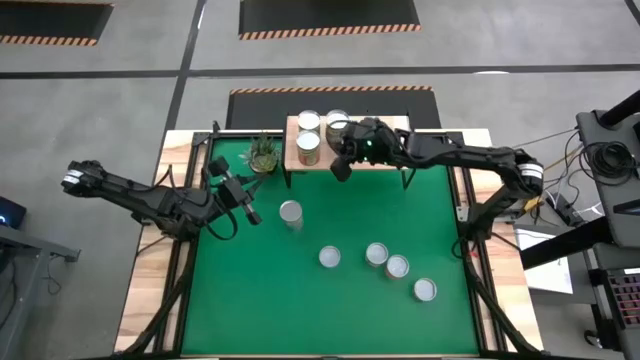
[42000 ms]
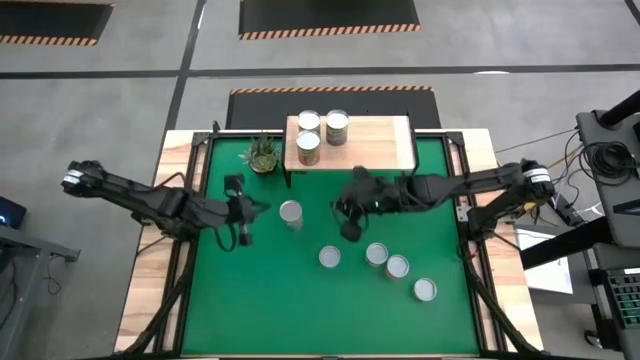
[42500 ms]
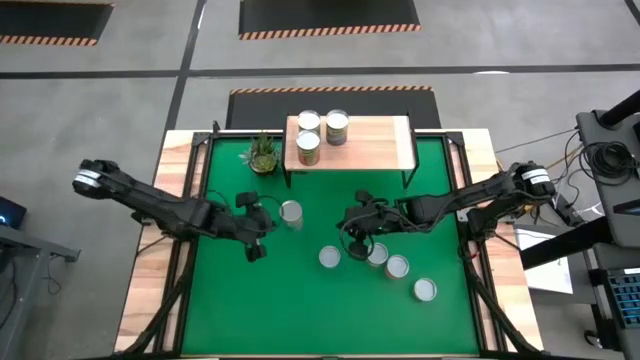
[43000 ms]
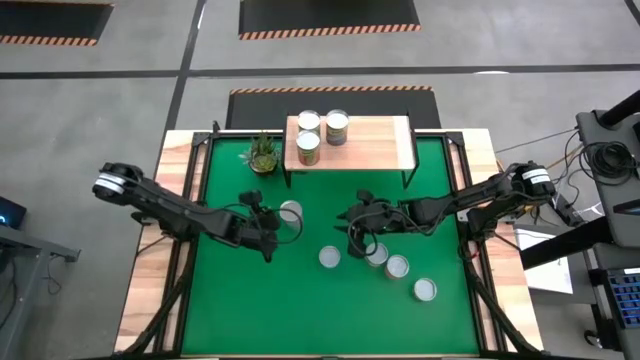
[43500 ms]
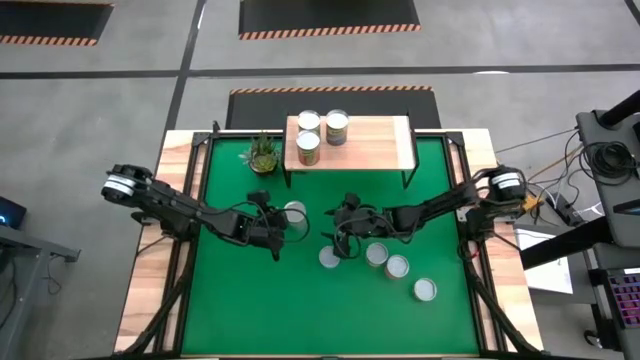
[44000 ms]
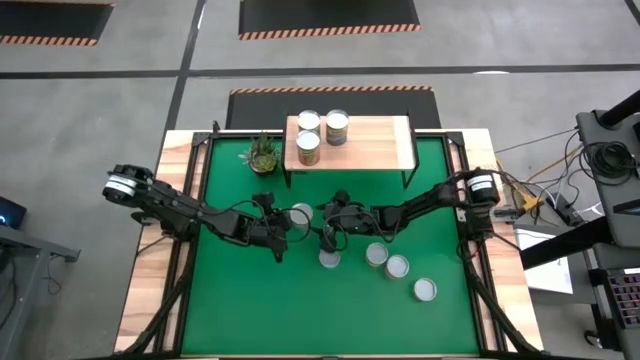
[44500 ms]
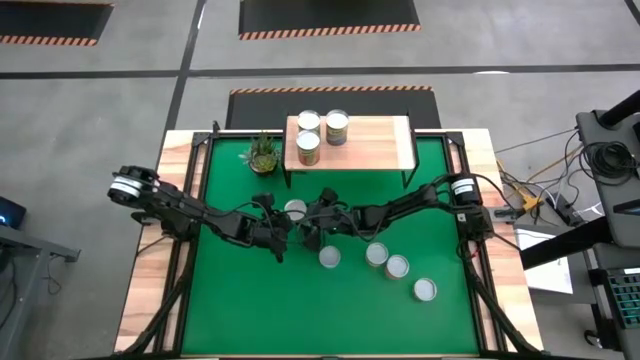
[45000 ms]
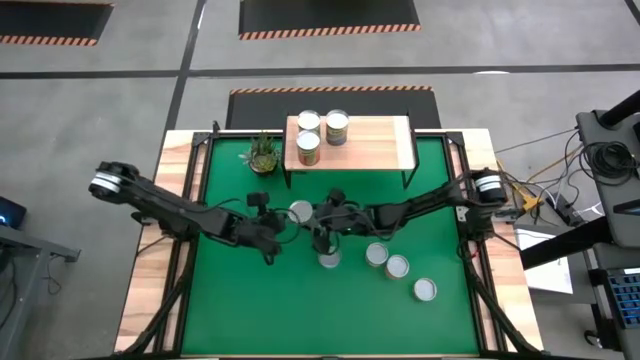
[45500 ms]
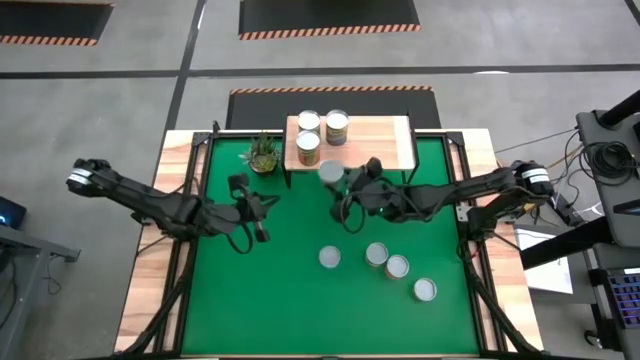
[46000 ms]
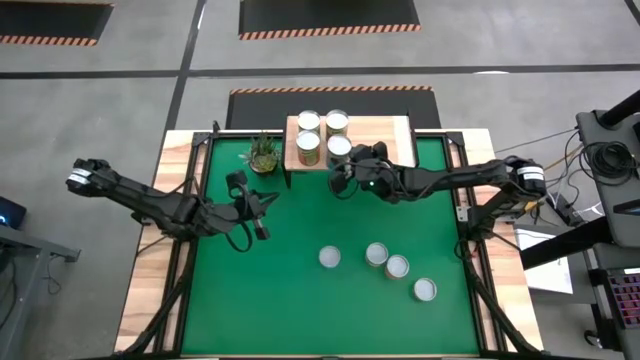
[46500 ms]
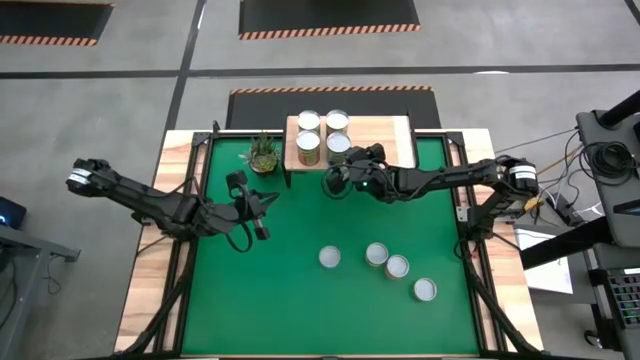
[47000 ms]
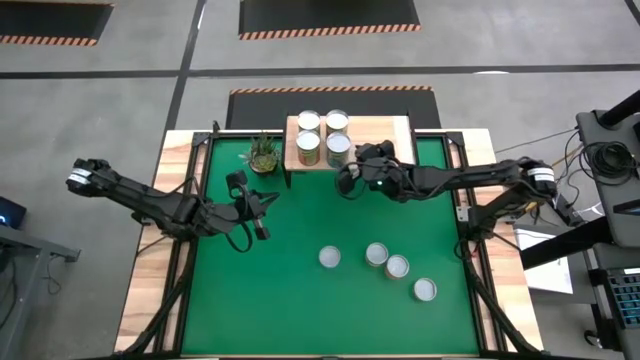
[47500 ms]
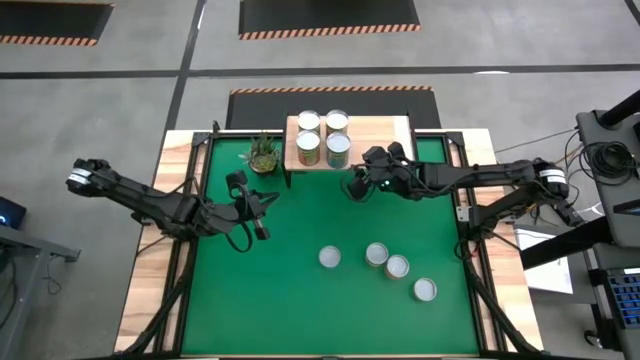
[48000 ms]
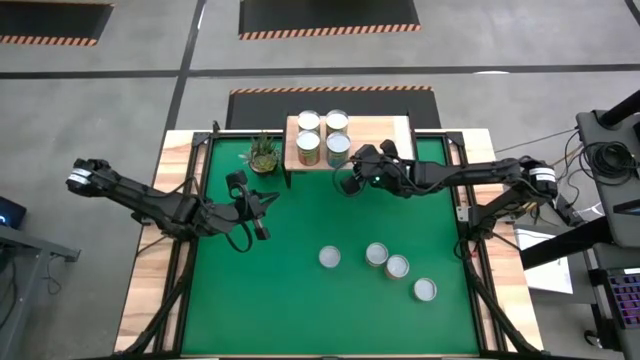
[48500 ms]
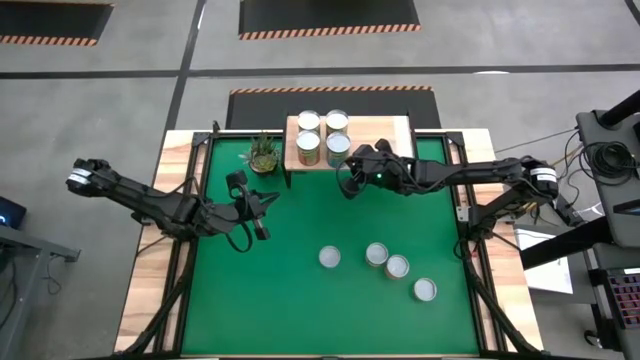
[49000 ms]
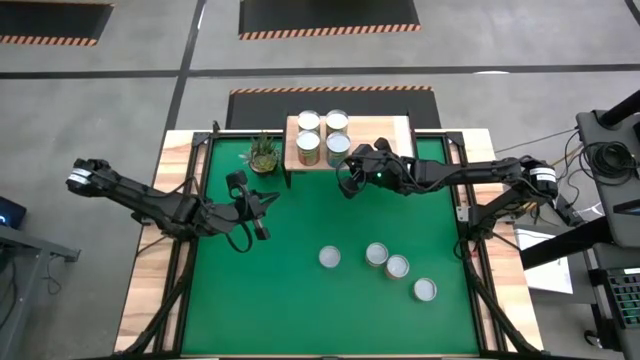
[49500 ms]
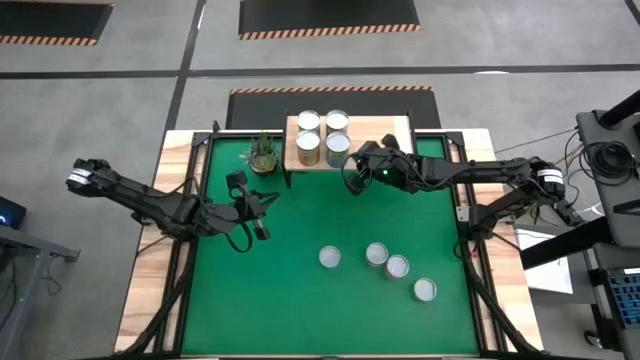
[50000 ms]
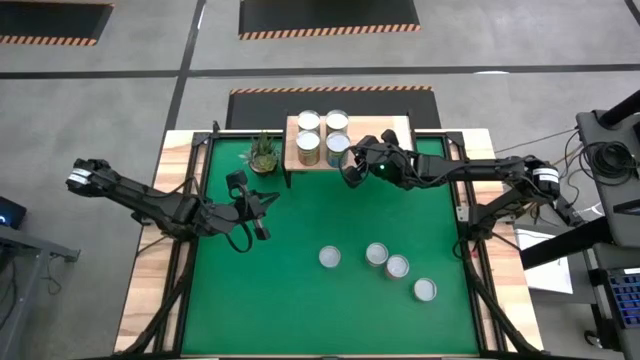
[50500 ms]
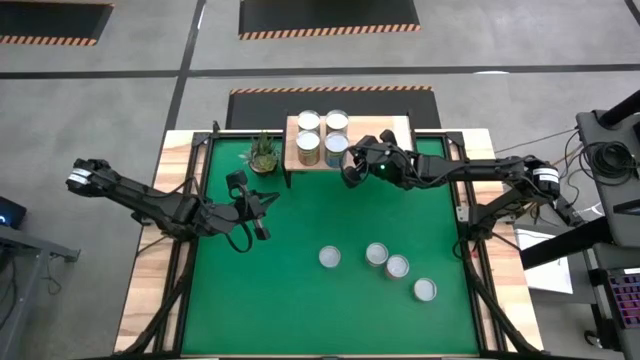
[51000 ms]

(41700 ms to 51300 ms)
Task: Pick and place cans onto a shelf
Put the canned cherries on the shelf

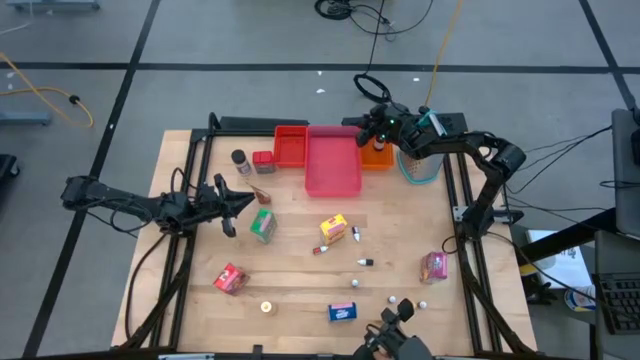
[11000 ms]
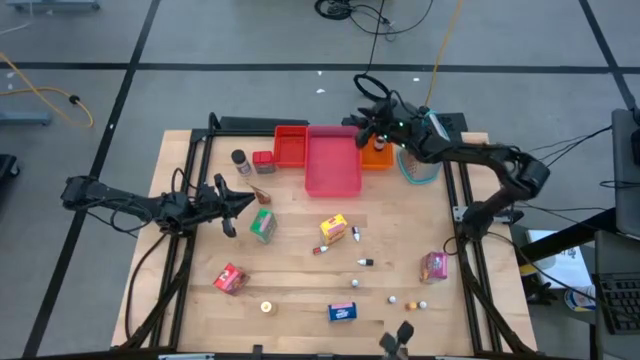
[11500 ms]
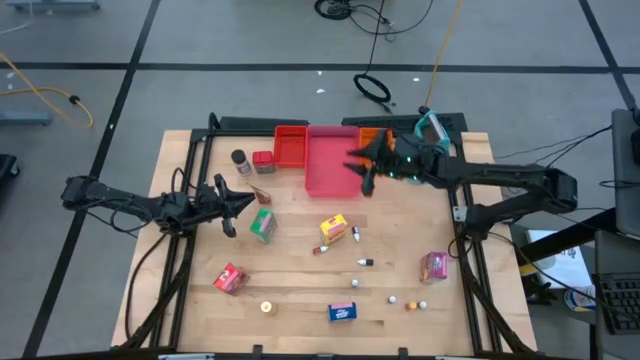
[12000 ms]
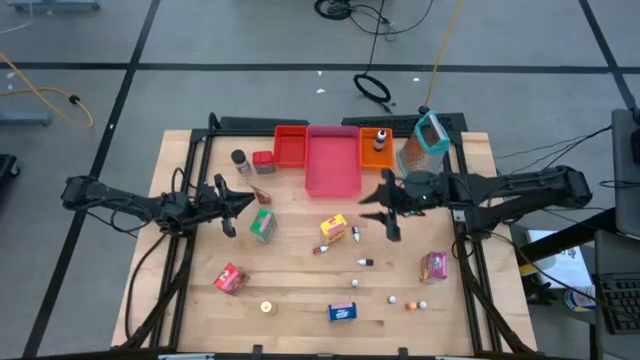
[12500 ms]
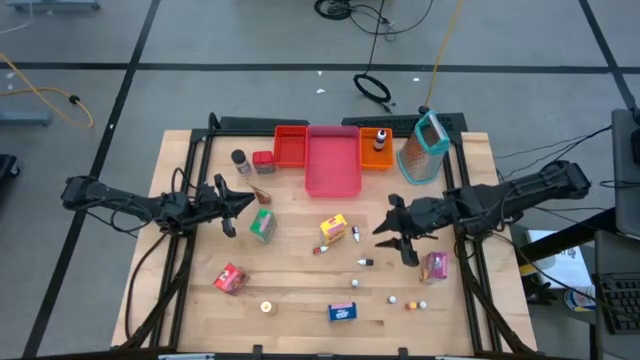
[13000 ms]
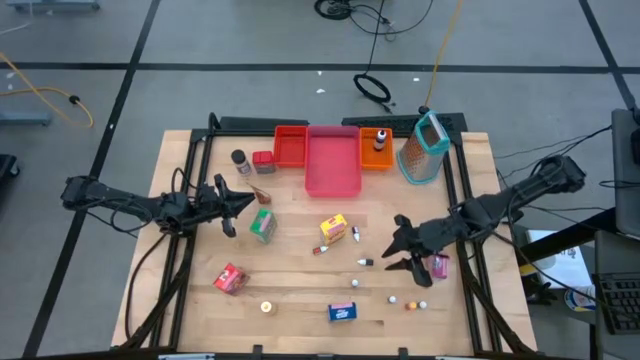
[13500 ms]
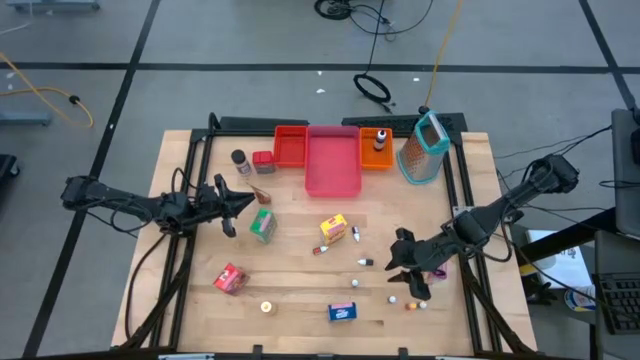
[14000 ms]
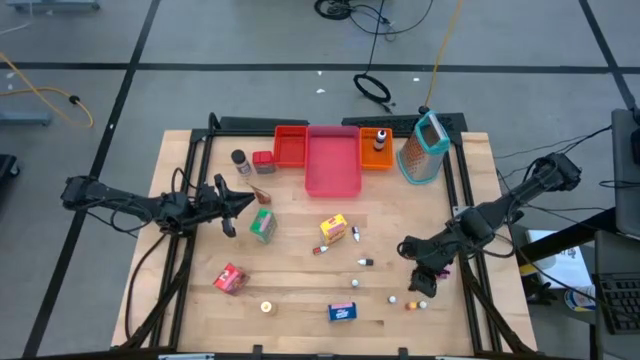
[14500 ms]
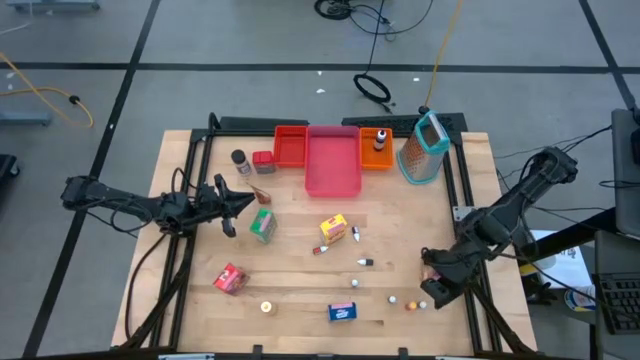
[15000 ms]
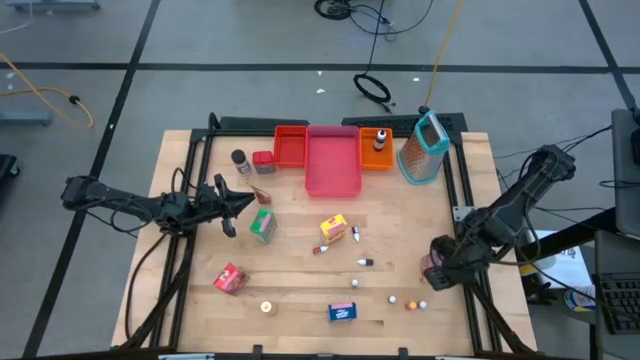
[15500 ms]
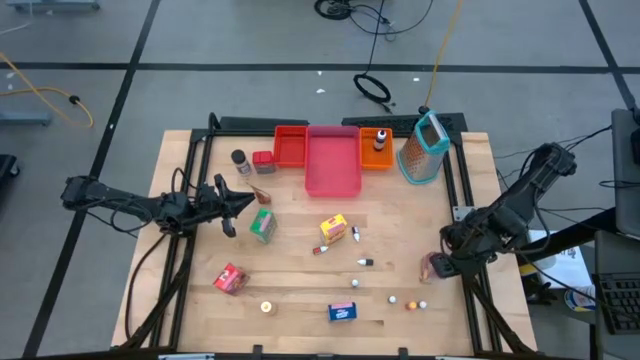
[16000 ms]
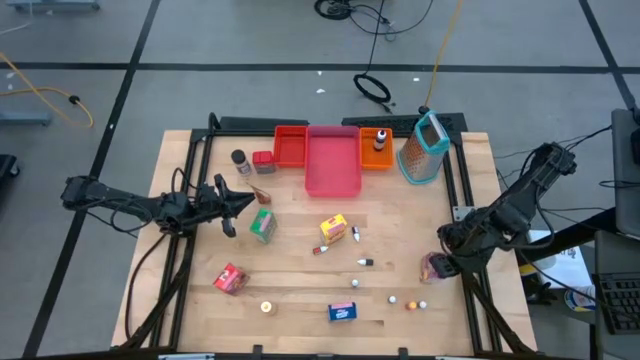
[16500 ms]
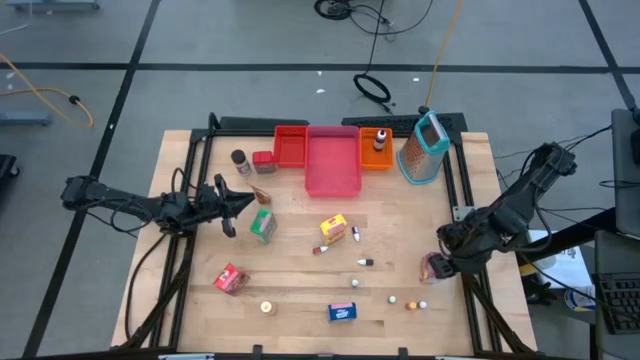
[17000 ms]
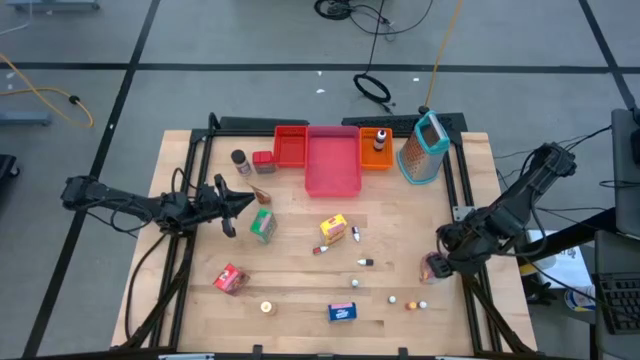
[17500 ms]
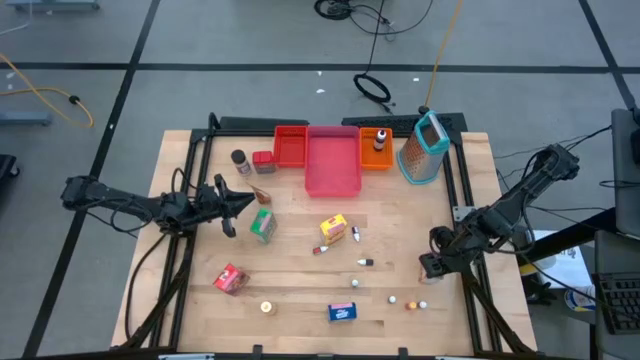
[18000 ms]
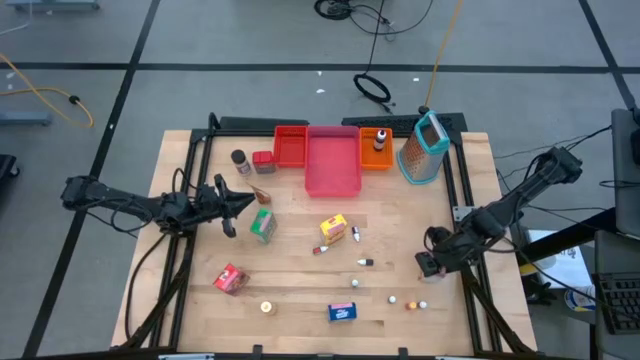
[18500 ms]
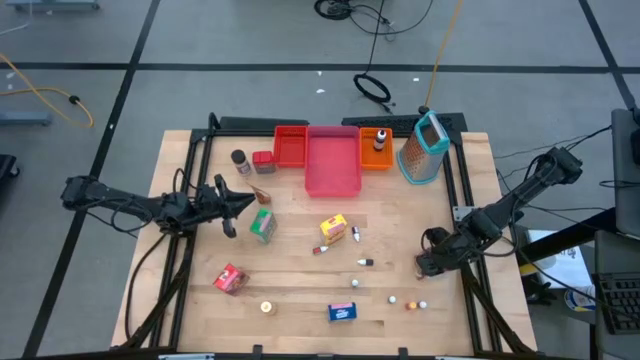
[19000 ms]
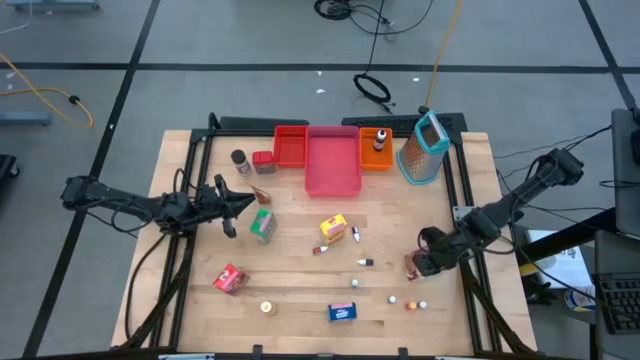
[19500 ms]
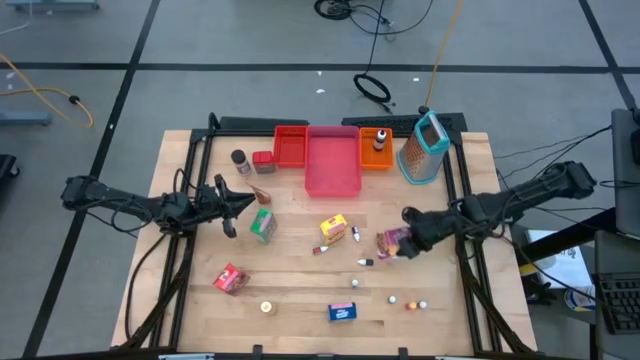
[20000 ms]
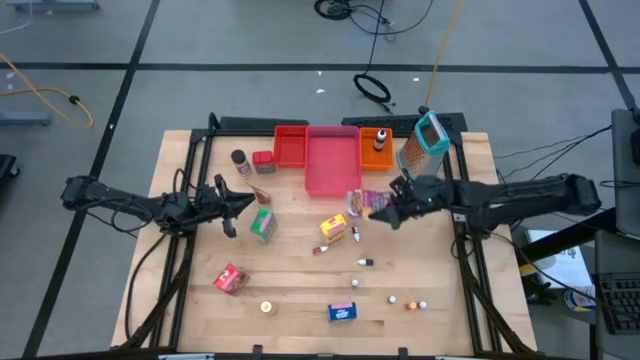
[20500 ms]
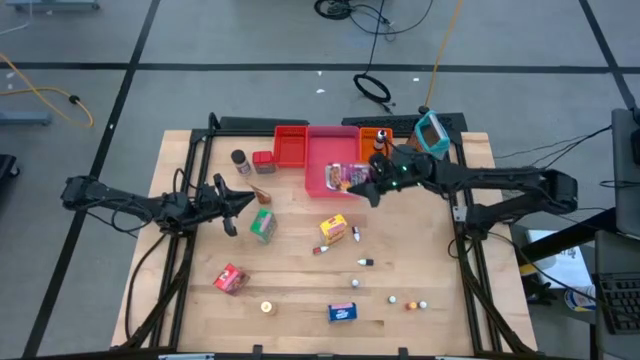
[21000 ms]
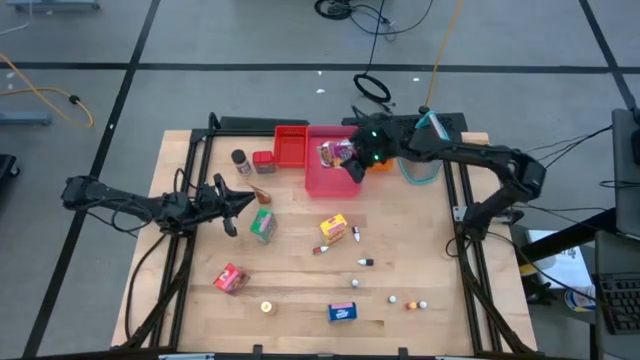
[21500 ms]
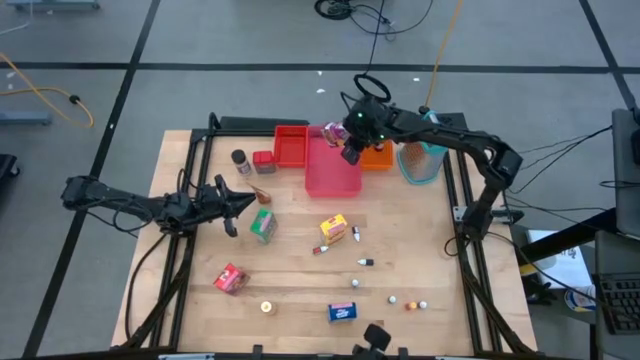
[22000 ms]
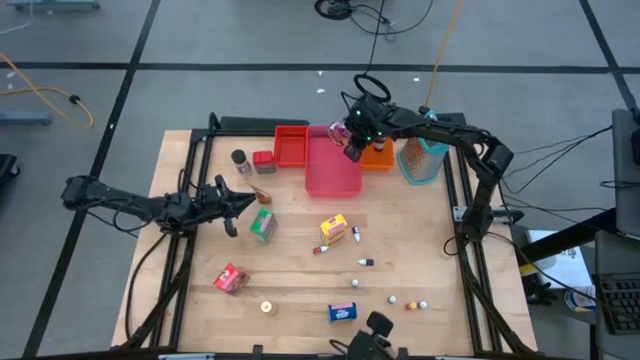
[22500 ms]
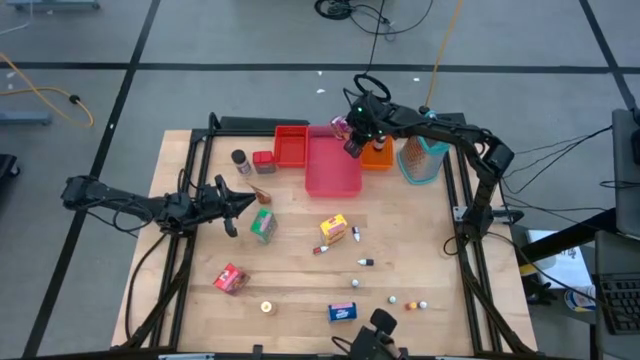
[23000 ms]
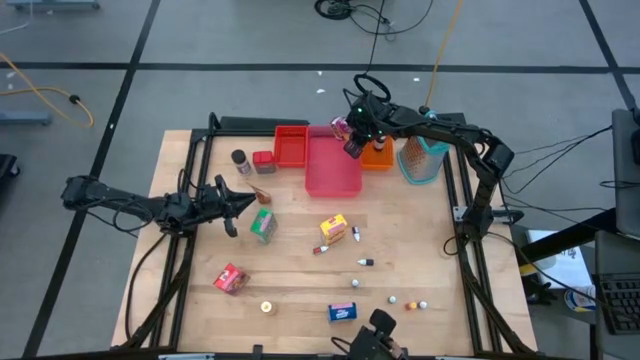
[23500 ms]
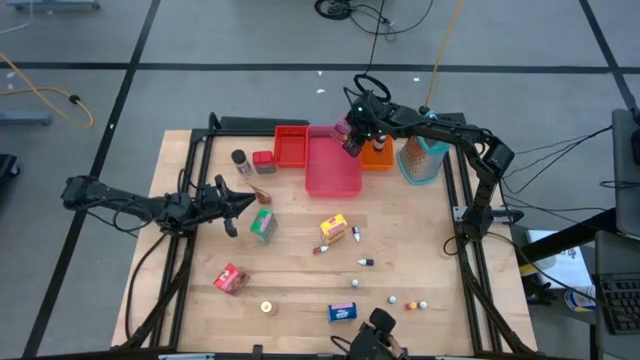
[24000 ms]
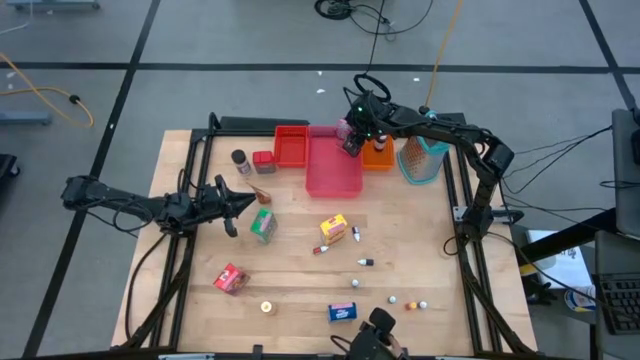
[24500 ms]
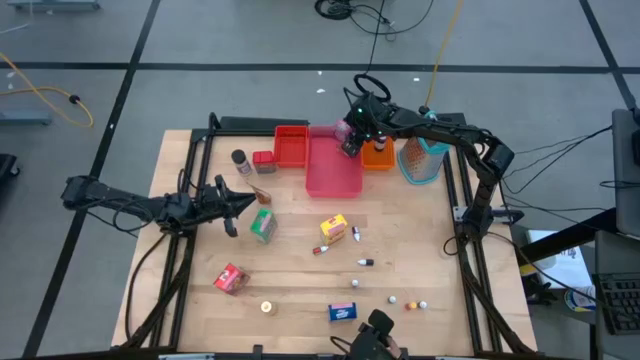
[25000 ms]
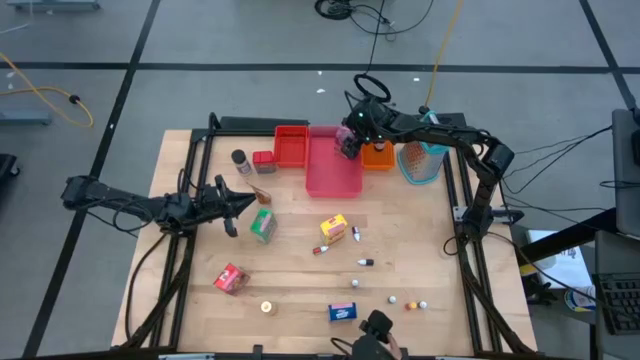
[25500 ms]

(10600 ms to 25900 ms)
Task: Pick & Place Kitchen Items
Put the purple cereal box into the pink bin
